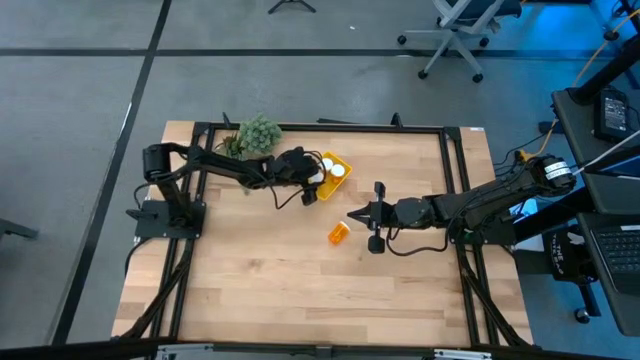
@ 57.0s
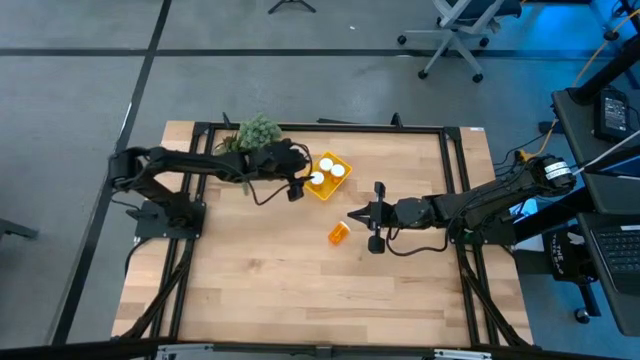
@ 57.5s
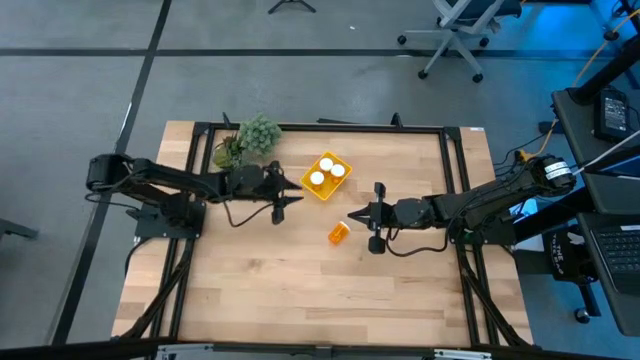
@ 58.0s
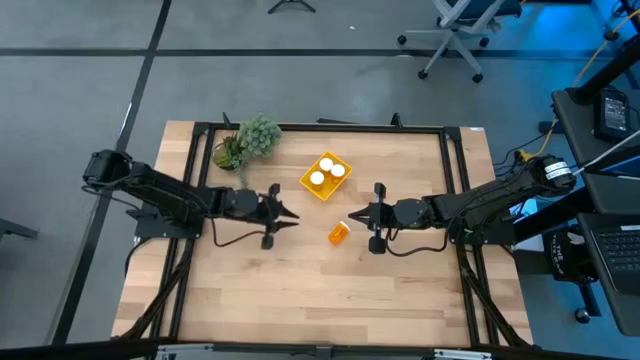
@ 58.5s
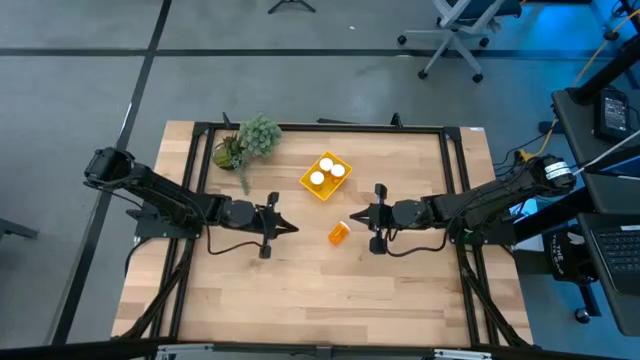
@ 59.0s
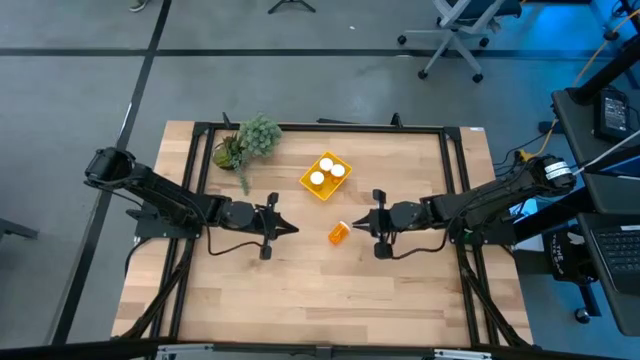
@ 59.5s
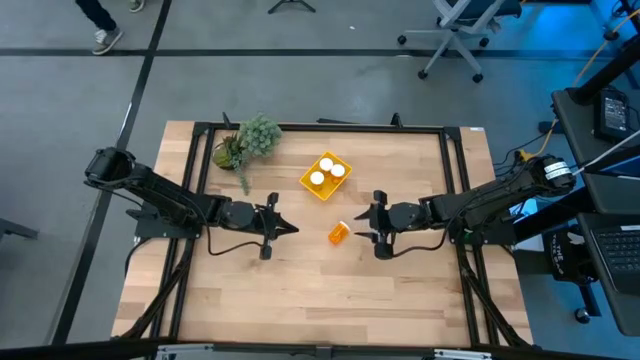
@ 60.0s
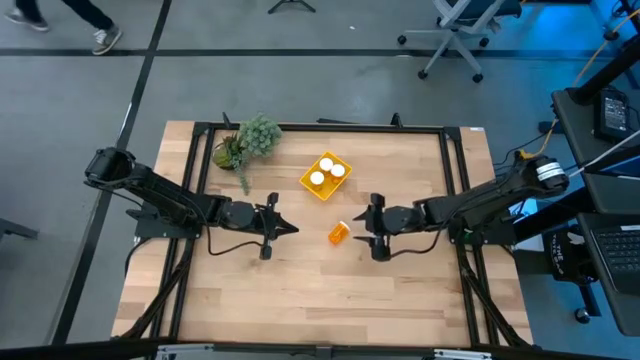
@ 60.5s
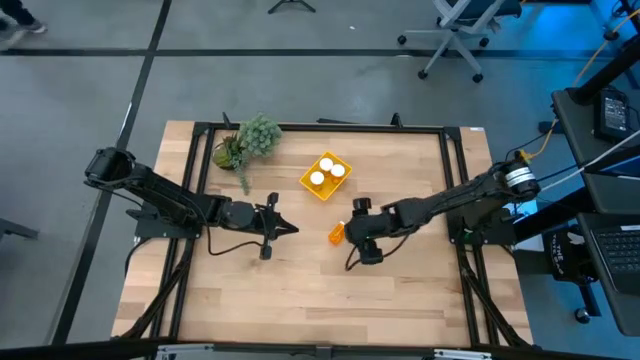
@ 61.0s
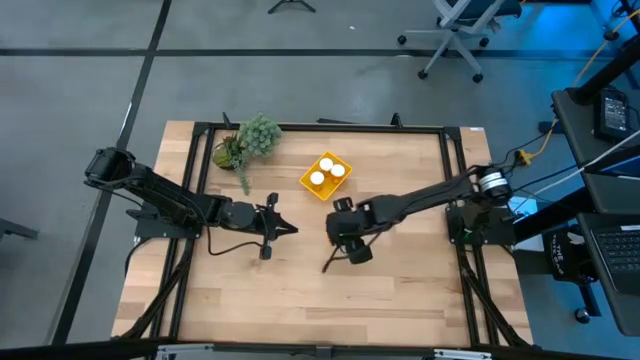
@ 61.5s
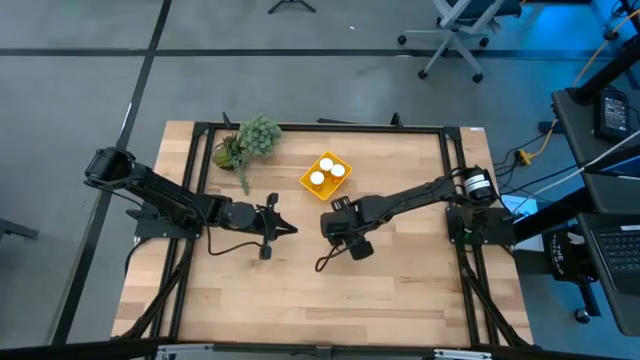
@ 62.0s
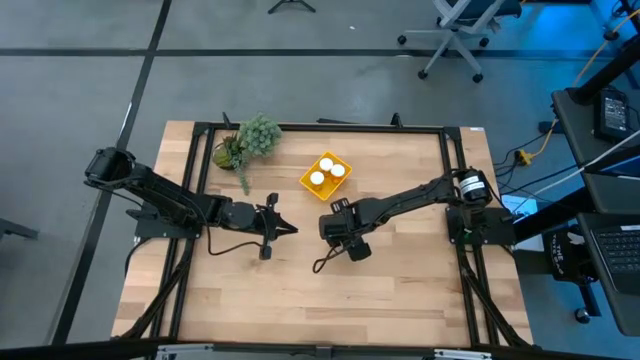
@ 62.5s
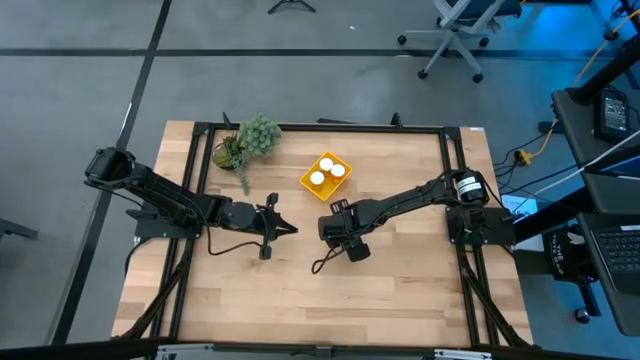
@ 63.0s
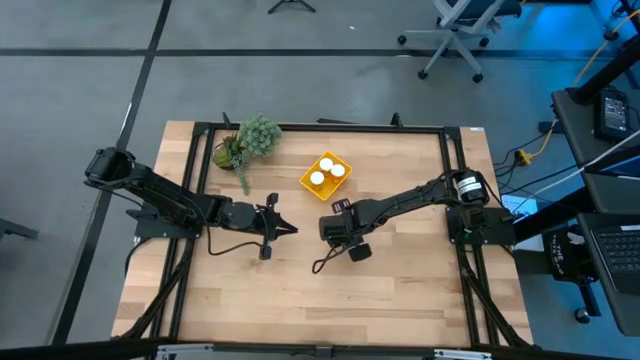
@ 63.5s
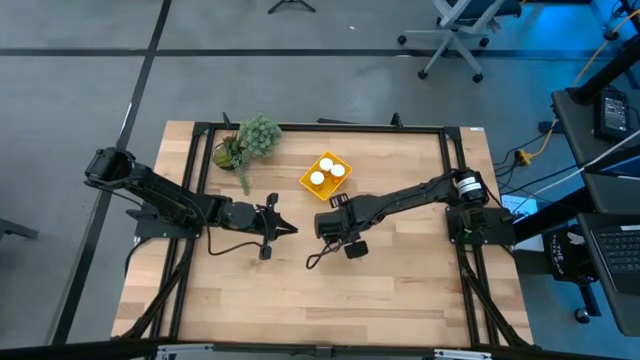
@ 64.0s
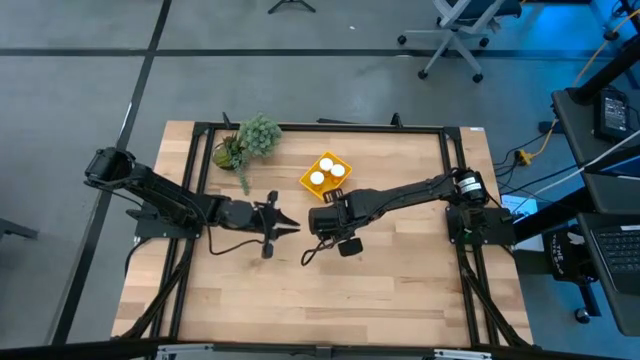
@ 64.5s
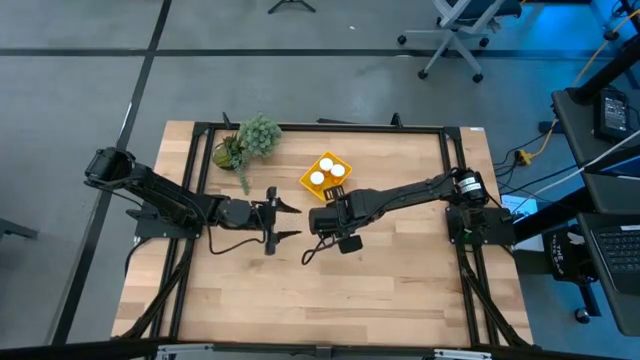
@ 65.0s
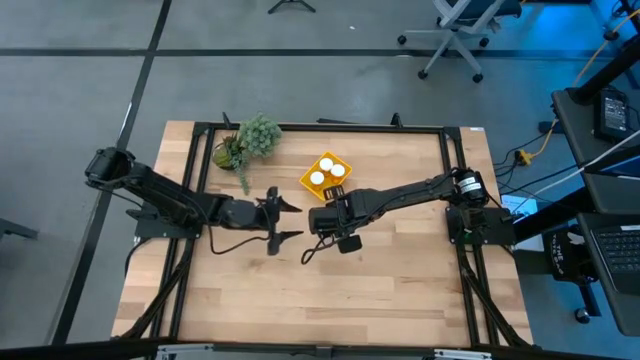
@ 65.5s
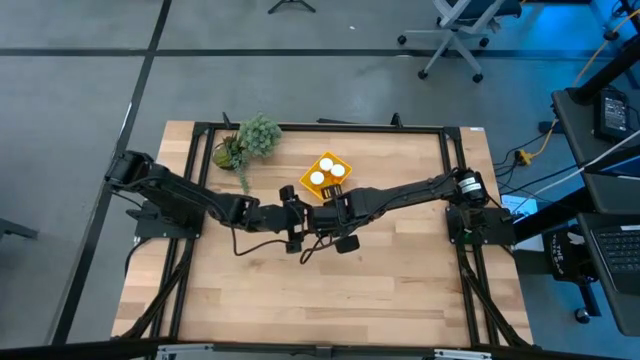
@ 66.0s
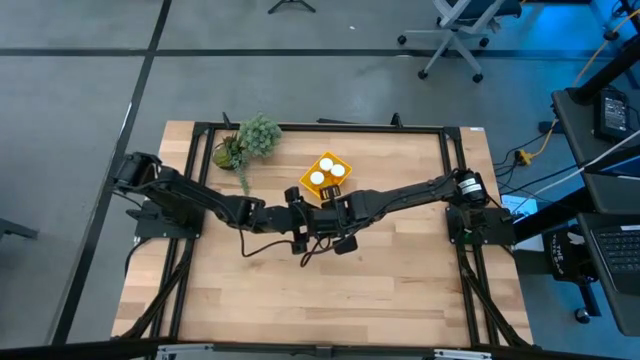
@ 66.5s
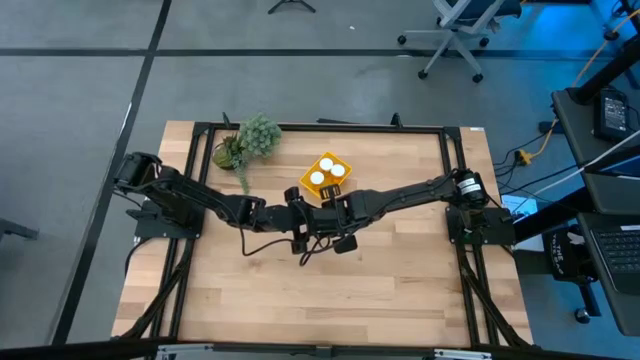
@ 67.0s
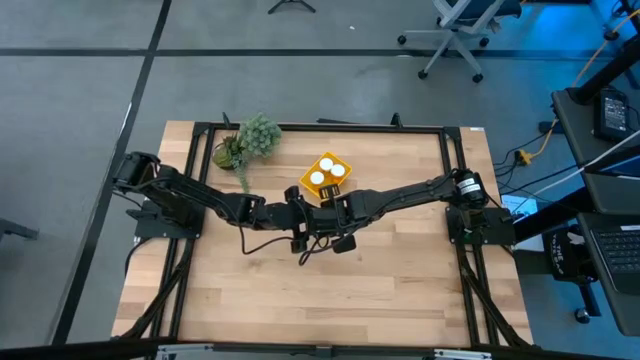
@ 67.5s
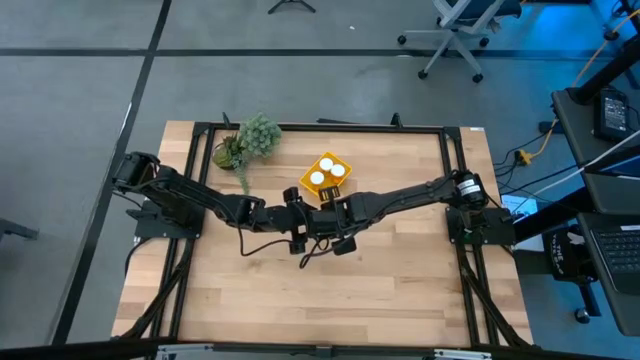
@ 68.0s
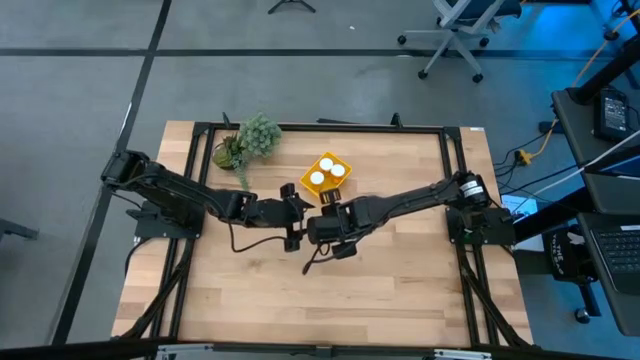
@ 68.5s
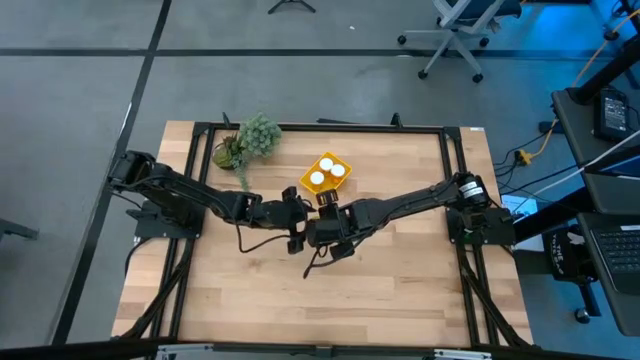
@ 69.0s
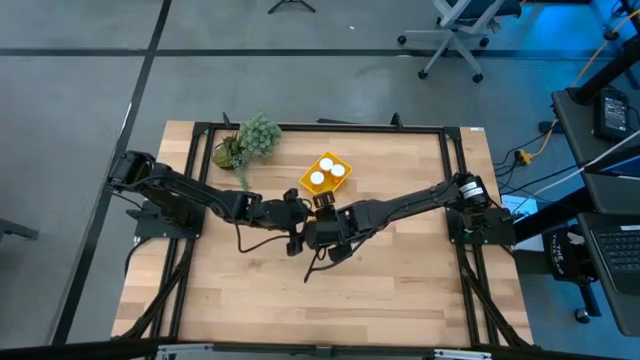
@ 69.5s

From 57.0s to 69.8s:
Task: Pick and place pill bottles into a basket
Put the orange pill bottle into the yellow bin

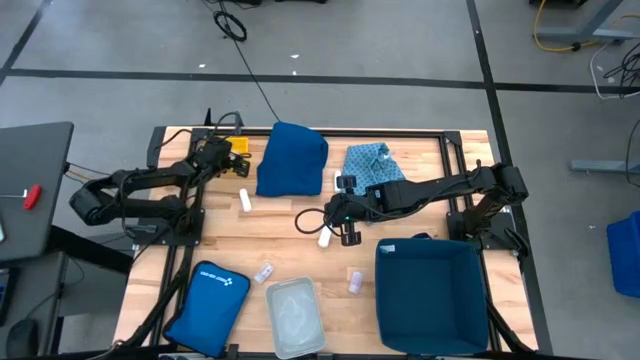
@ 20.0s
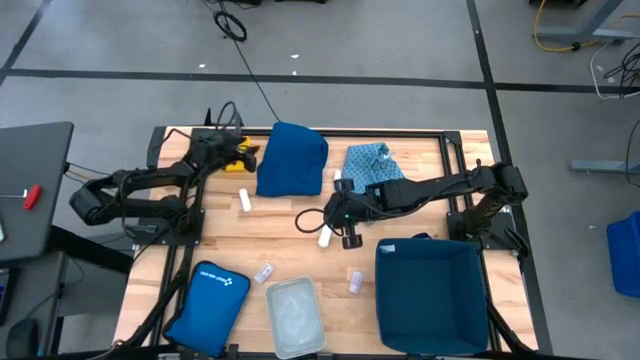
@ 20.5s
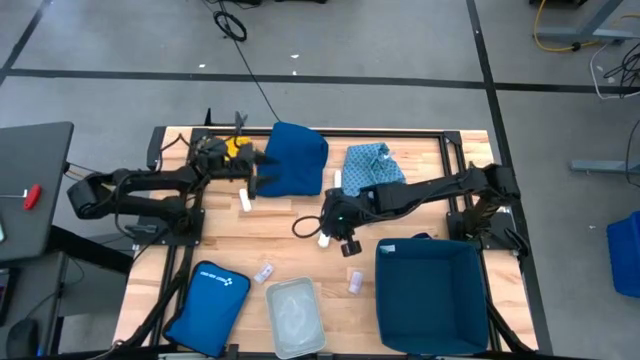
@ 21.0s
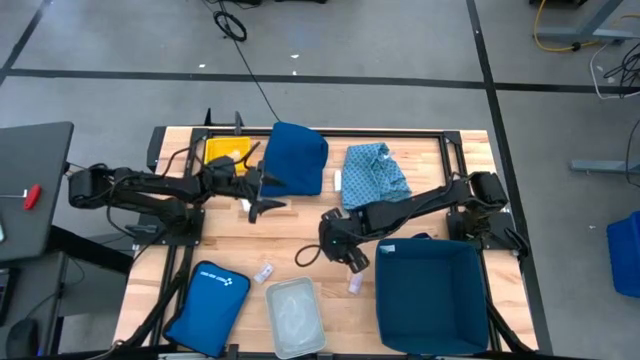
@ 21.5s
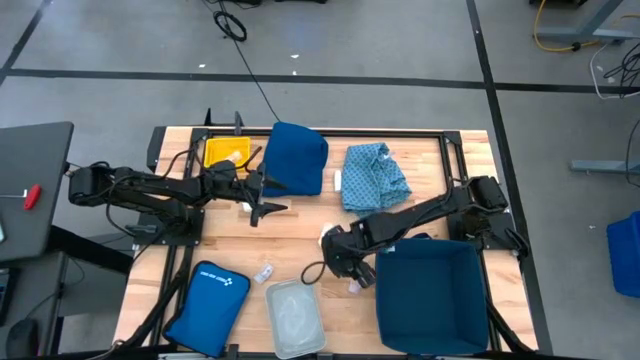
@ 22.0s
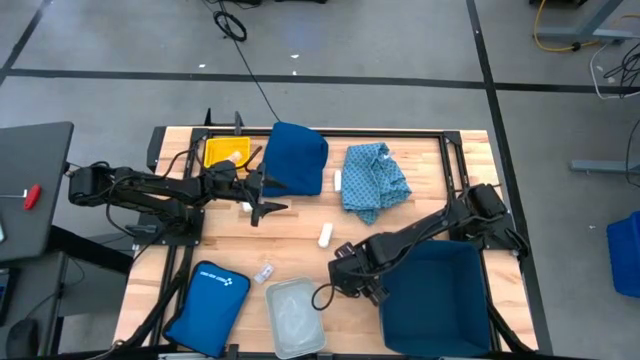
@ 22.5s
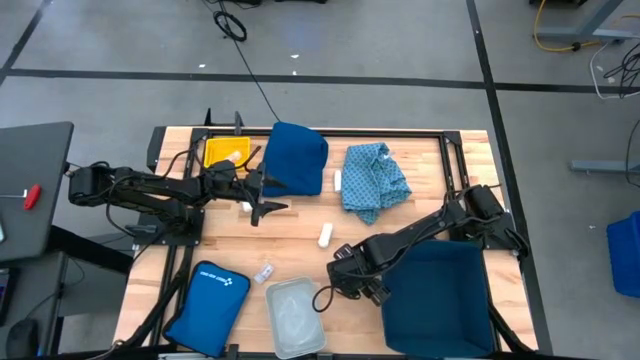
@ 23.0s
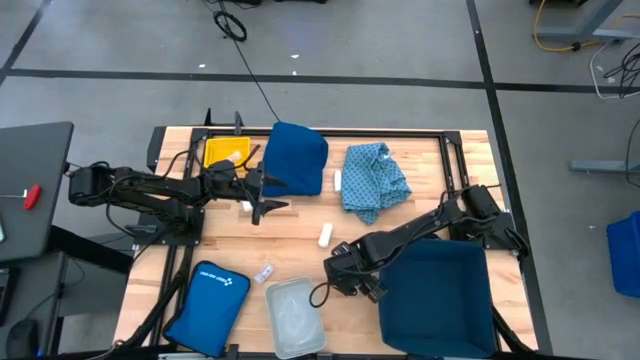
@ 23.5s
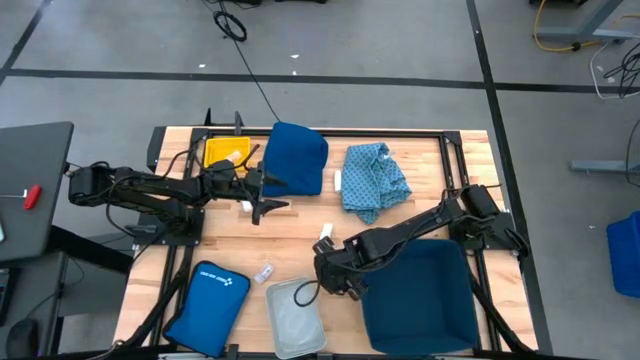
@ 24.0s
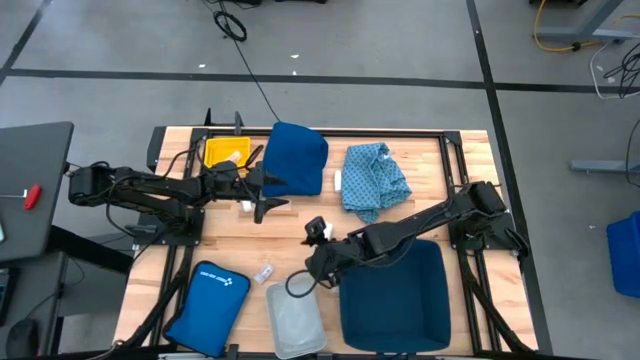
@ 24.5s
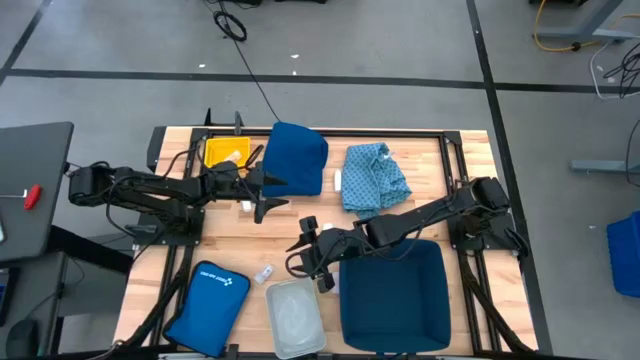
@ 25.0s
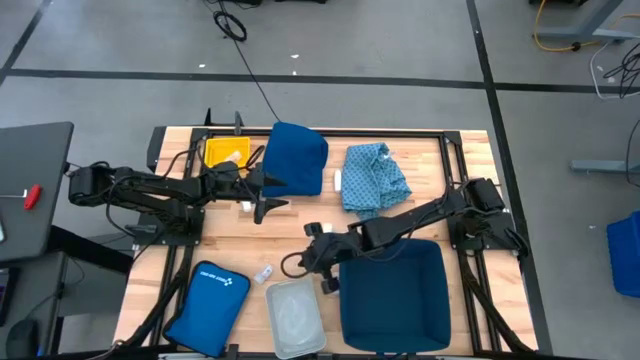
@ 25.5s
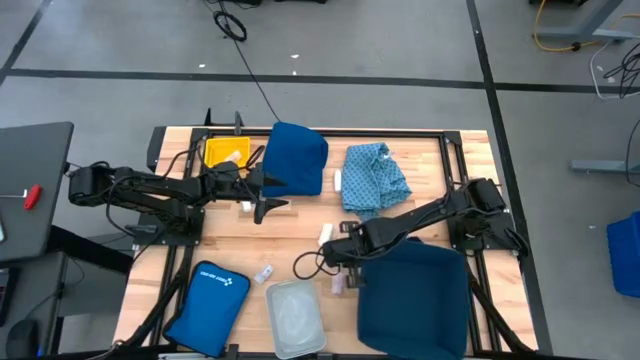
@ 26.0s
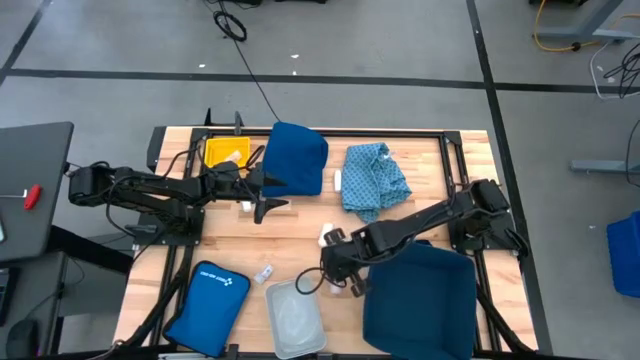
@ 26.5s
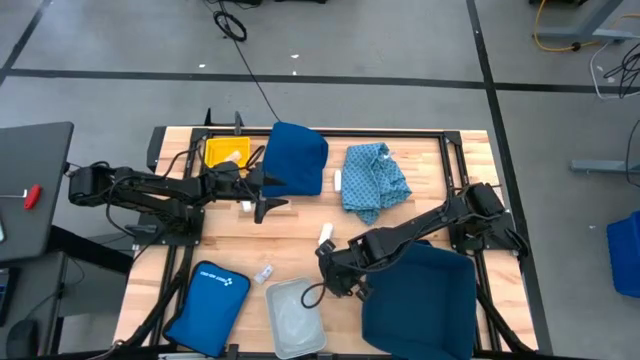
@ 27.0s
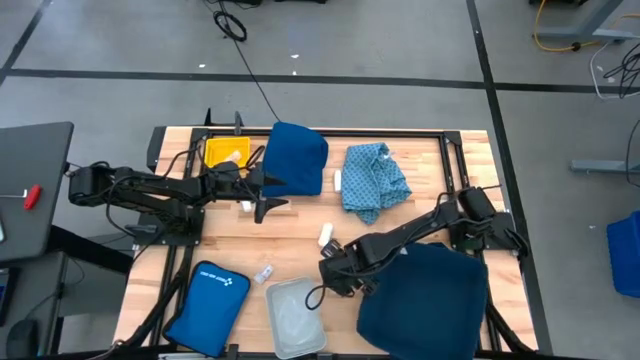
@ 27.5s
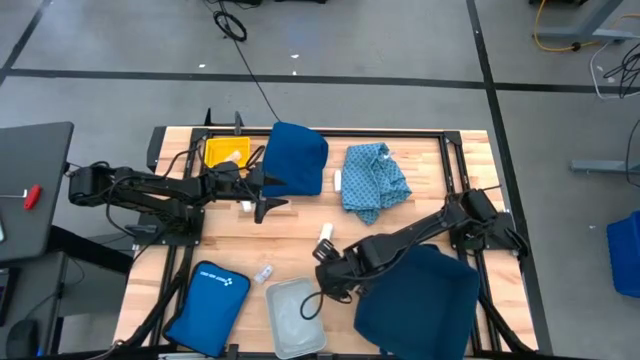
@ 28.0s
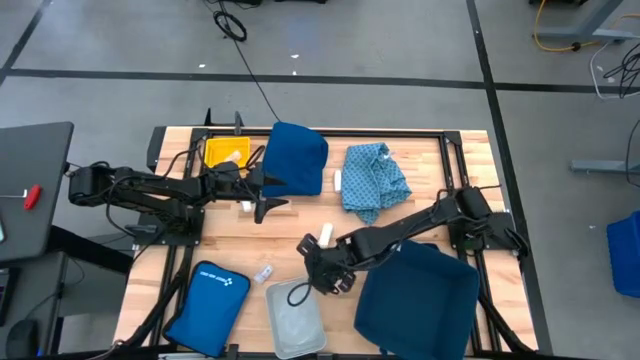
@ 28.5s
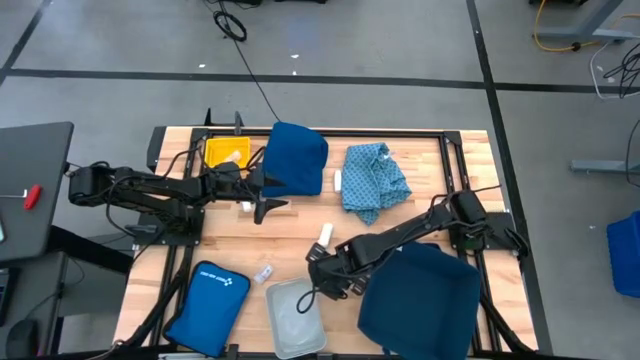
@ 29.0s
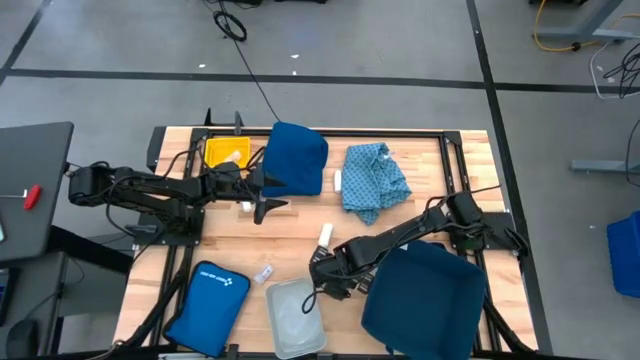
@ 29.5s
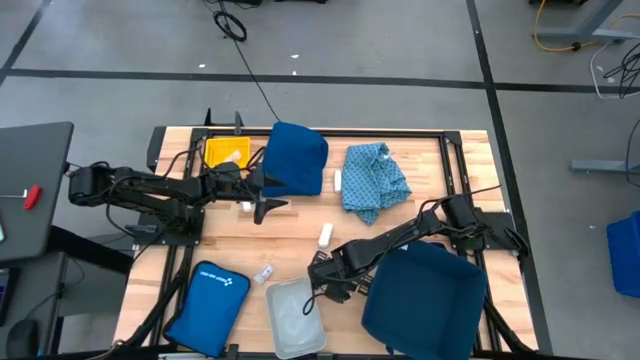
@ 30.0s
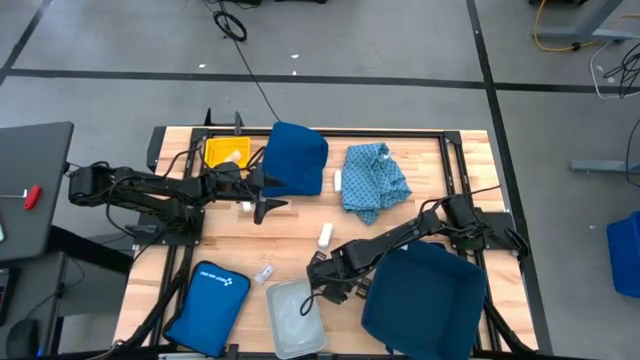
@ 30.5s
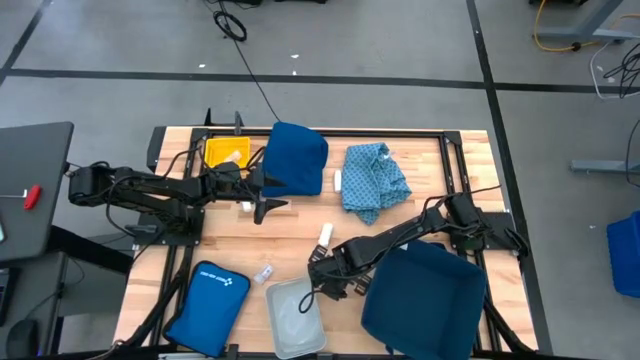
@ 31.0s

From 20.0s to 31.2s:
Task: Pick & place medical supplies in basket/bin
Put the right white pill bottle into the yellow bin
